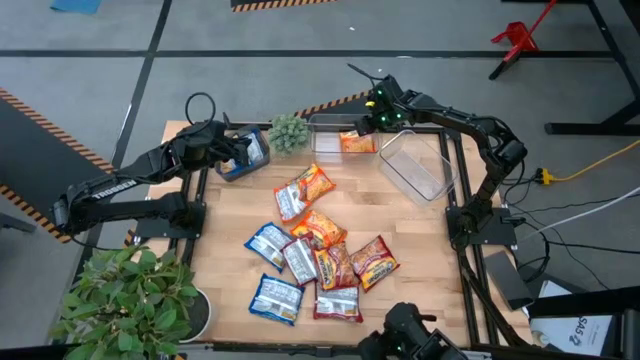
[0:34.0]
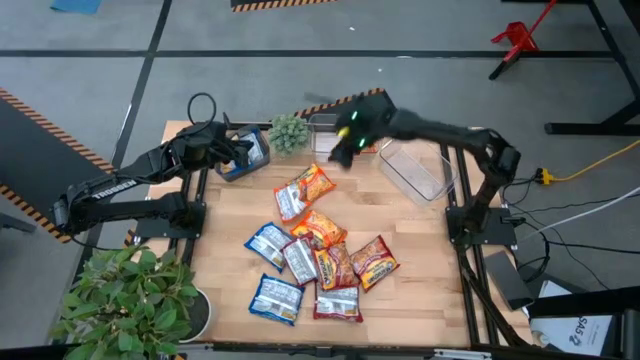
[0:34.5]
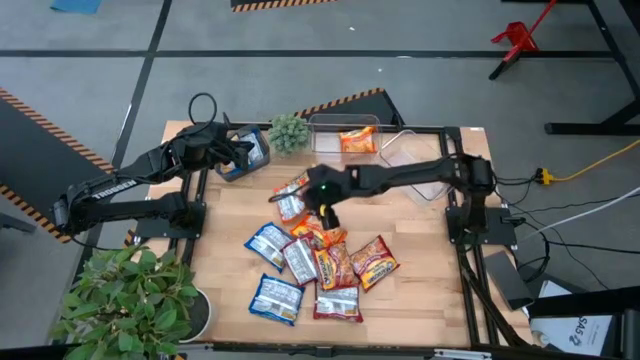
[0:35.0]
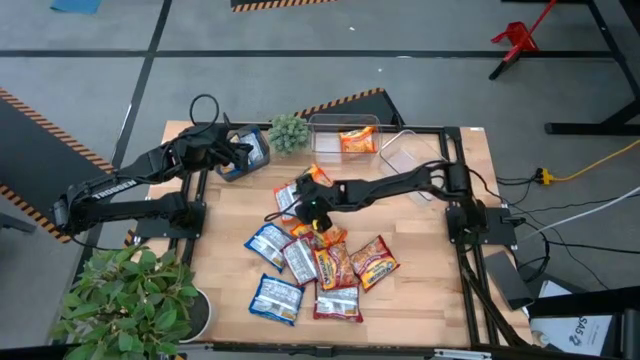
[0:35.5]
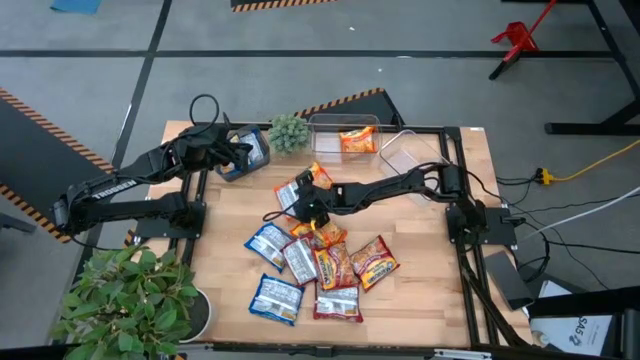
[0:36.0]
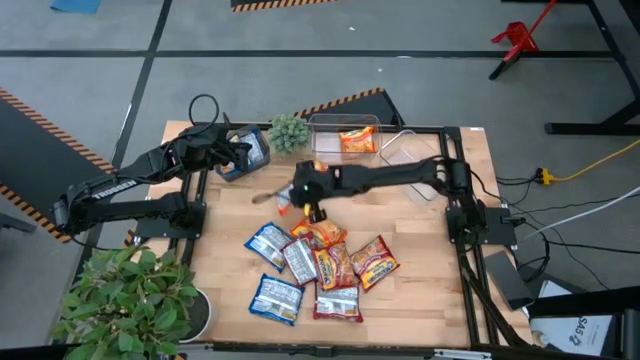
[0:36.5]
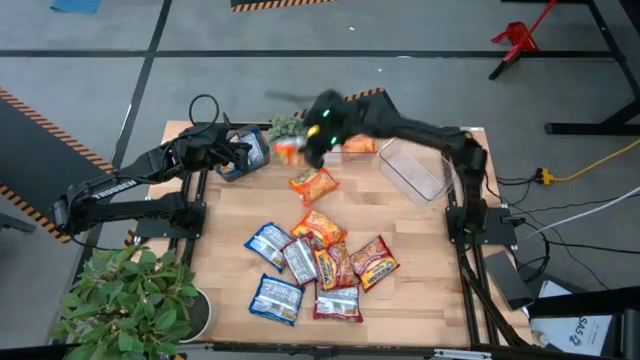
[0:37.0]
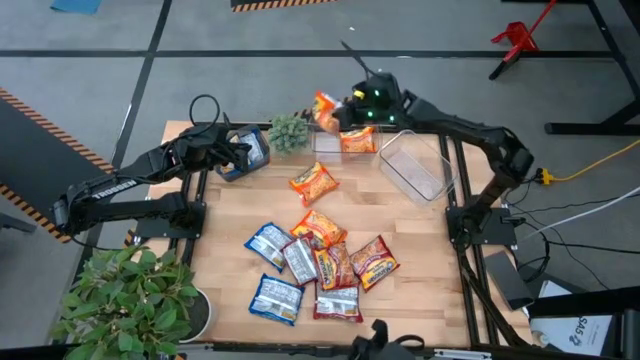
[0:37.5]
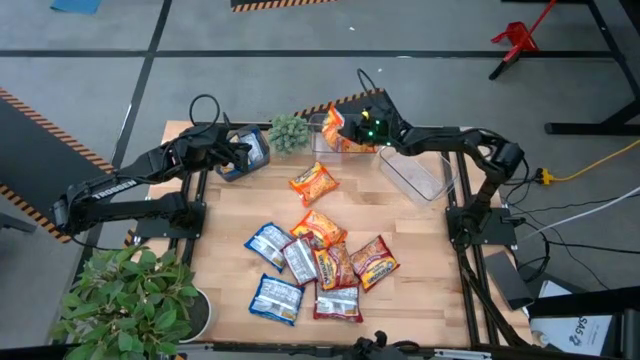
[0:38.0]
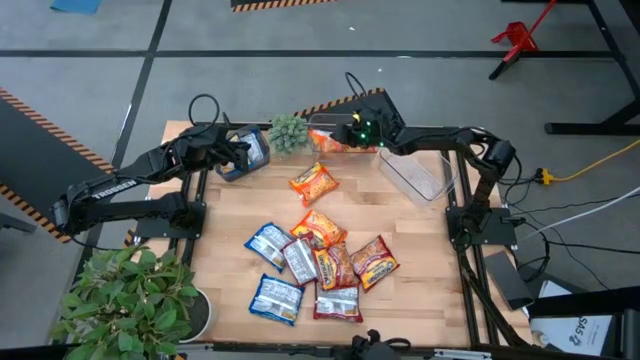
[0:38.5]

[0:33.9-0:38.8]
Task: Sort Maruchan noodles
Put the orange noodle pack into the left transparent bin

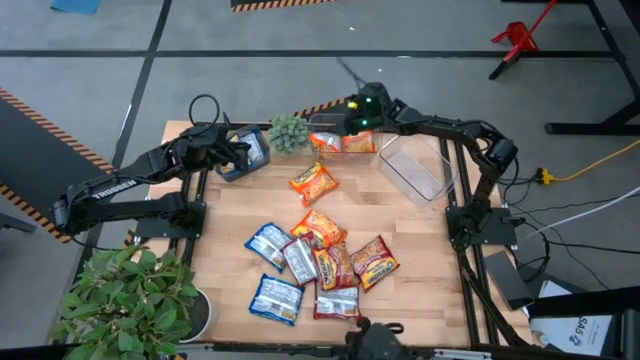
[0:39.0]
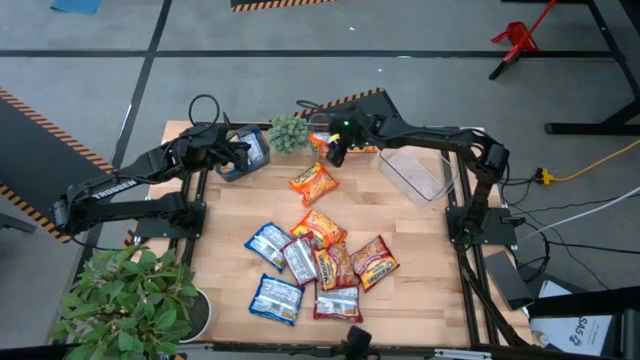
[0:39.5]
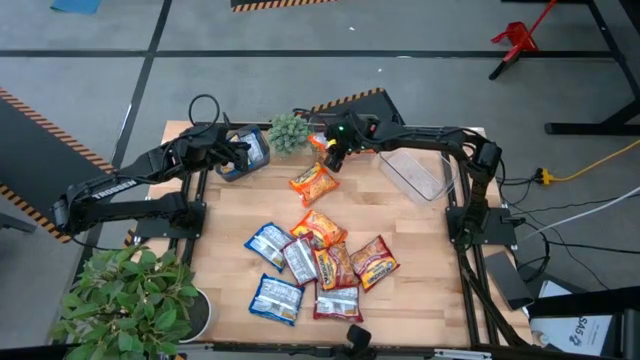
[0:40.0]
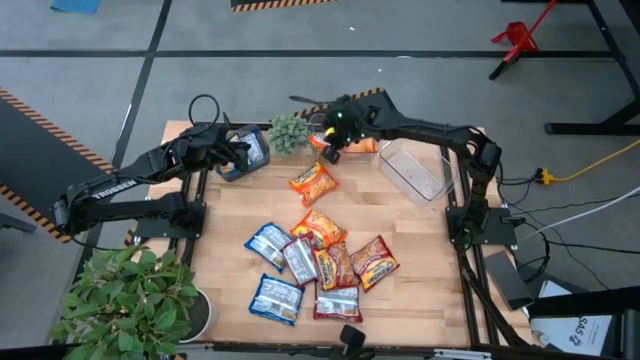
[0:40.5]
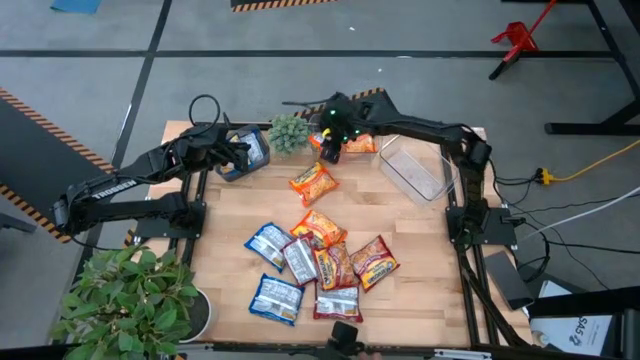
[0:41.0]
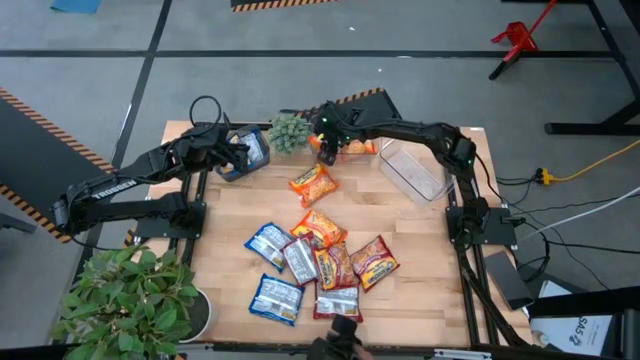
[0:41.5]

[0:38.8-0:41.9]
Put the orange noodle pack into the left transparent bin

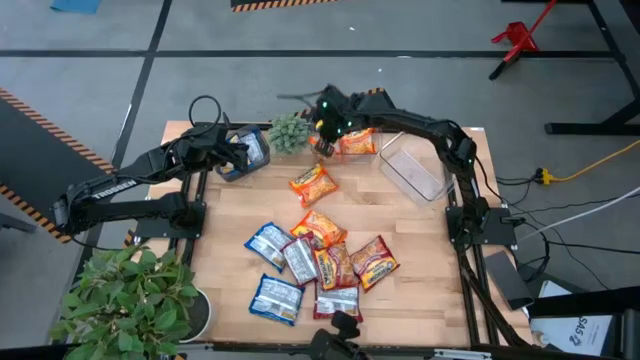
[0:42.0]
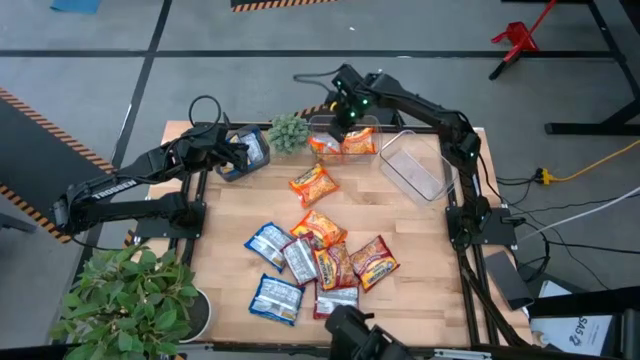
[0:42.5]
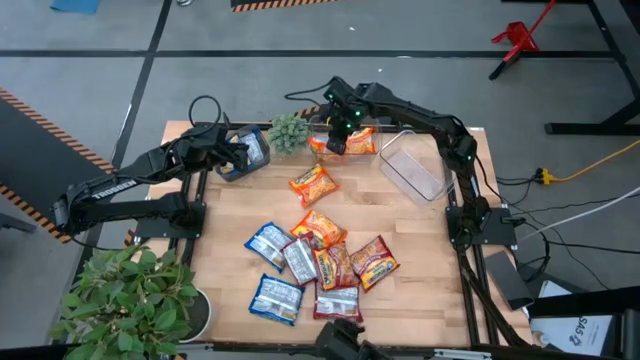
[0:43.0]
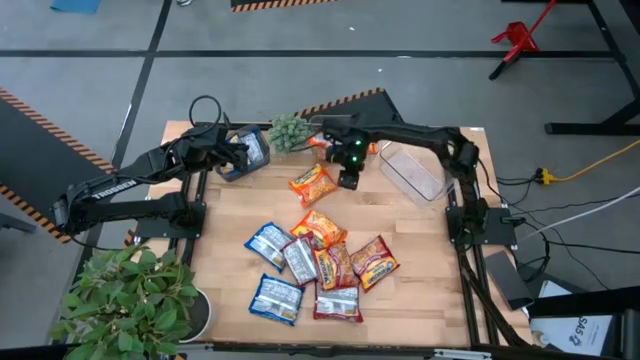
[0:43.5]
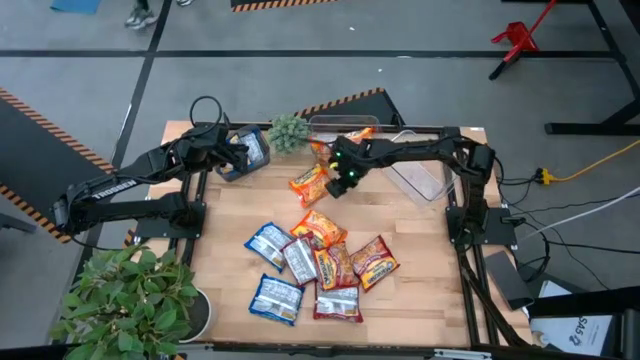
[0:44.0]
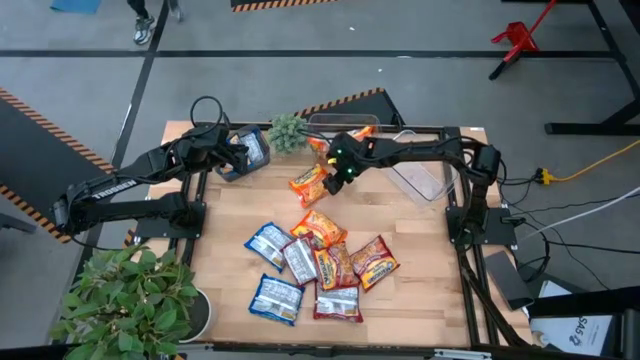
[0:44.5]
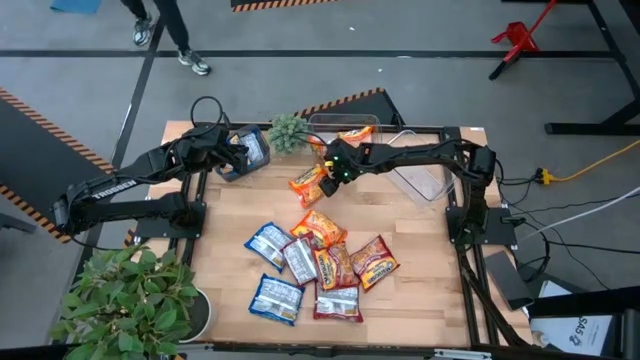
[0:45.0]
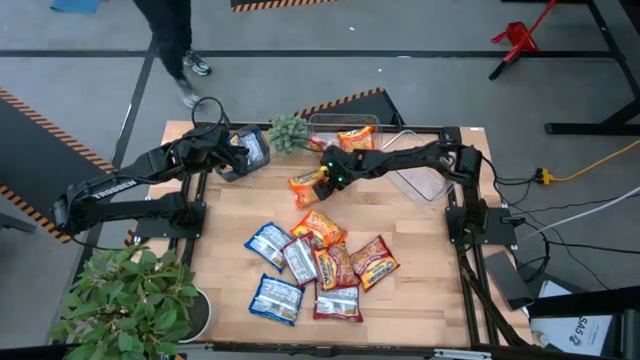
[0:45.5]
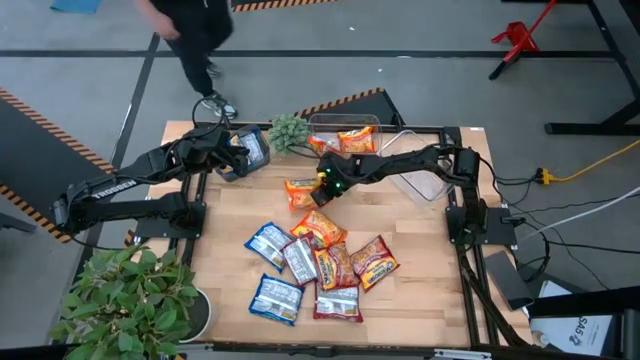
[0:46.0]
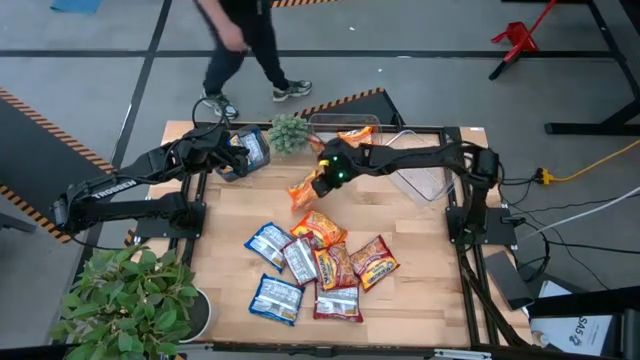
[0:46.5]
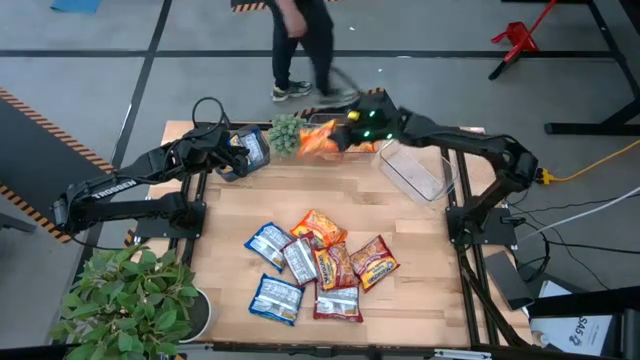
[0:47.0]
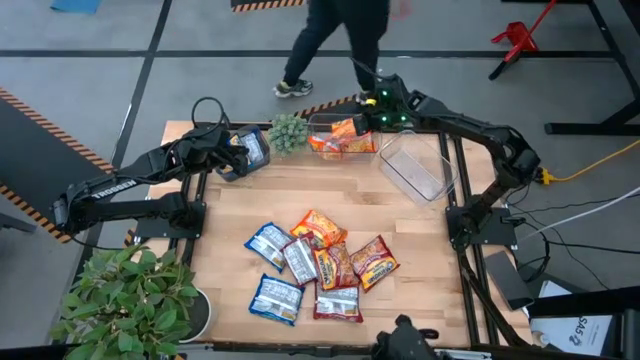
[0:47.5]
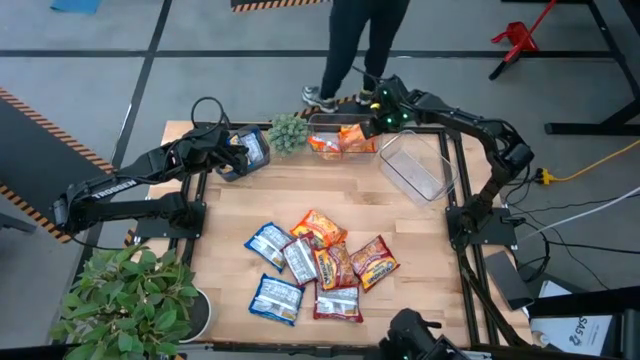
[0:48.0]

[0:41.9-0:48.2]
Put the orange noodle pack into the left transparent bin

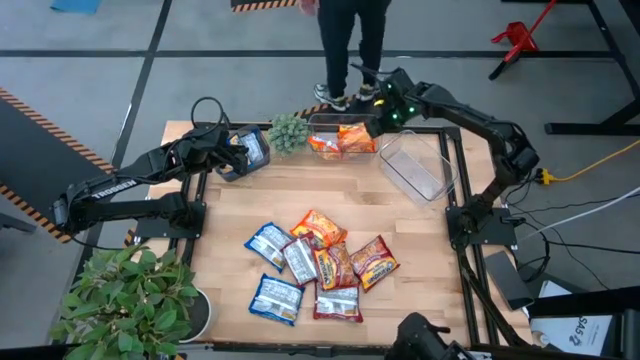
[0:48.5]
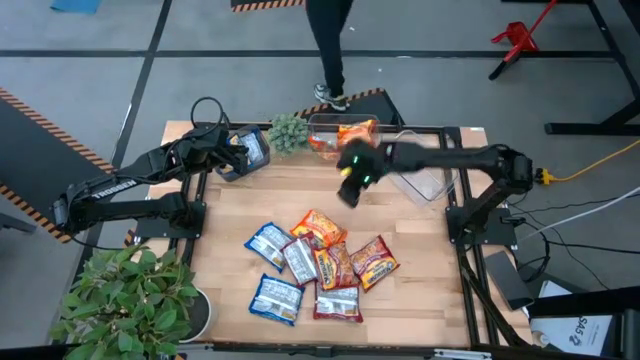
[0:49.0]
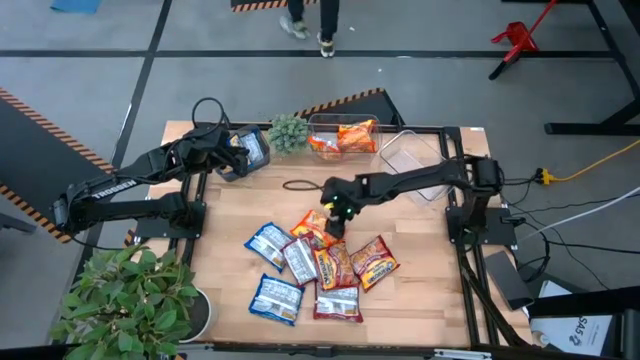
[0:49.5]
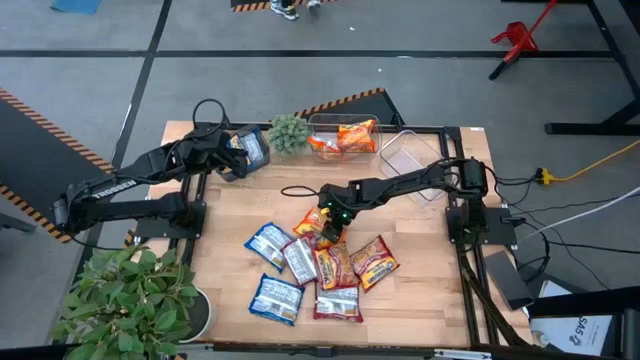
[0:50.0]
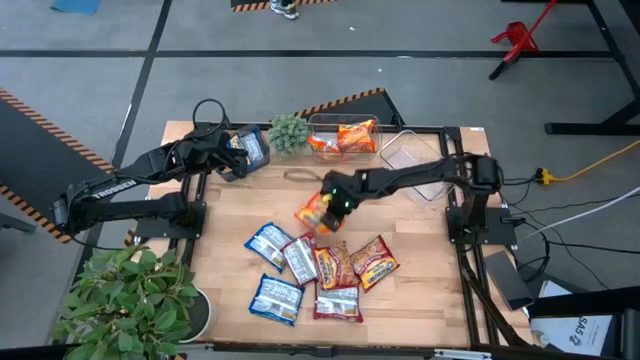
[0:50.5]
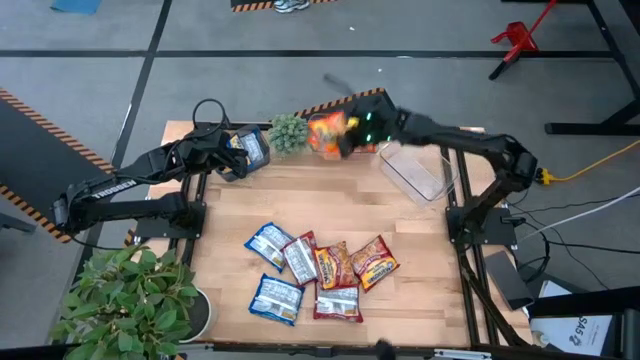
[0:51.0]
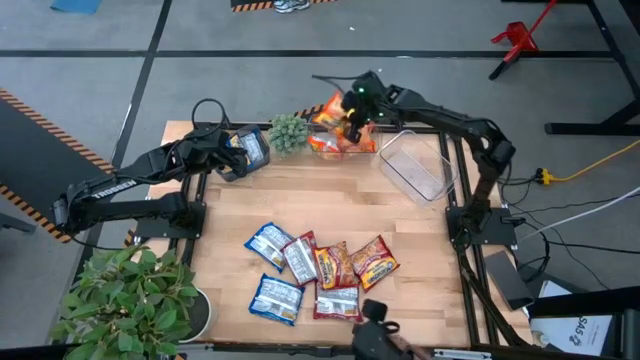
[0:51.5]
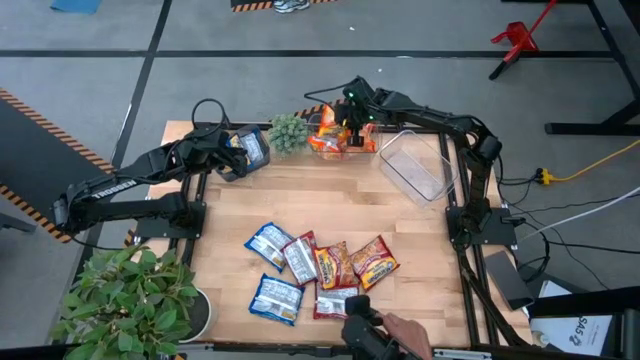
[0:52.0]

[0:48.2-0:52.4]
Put the orange noodle pack into the left transparent bin

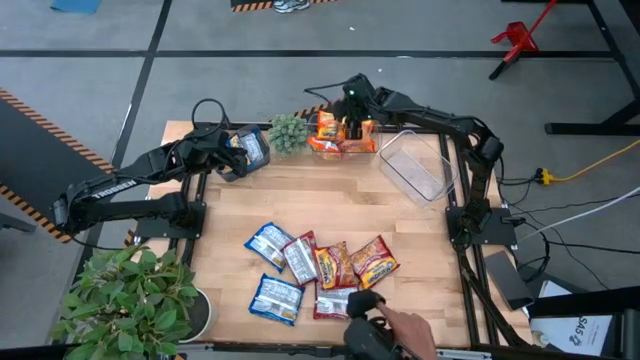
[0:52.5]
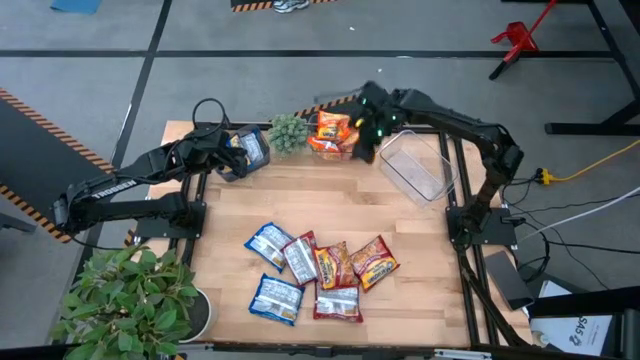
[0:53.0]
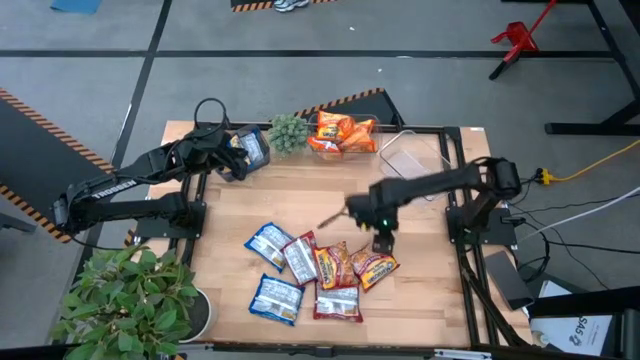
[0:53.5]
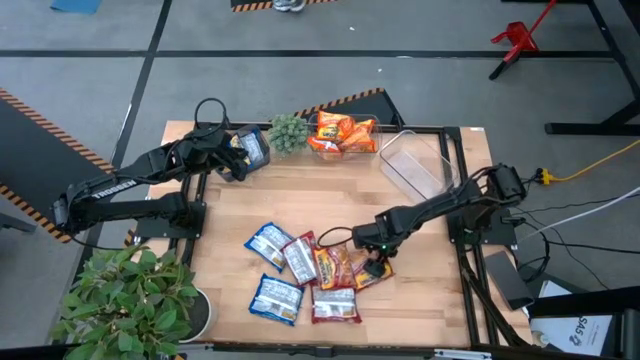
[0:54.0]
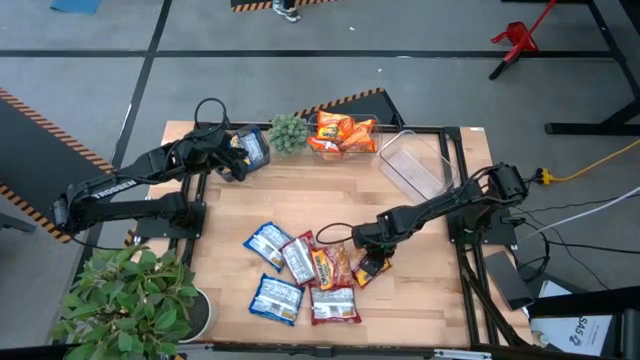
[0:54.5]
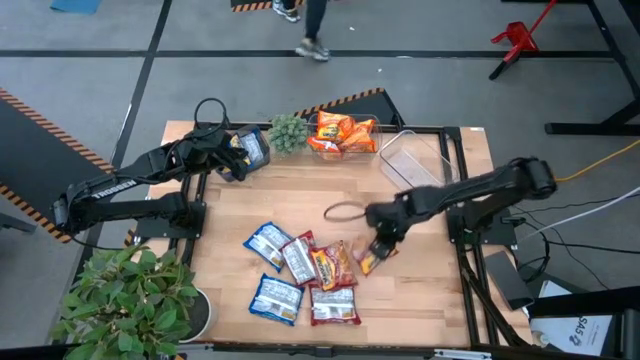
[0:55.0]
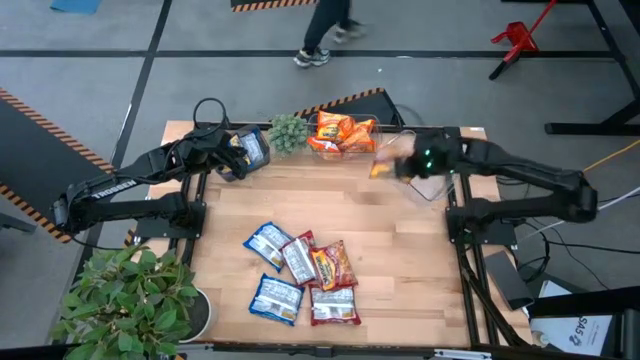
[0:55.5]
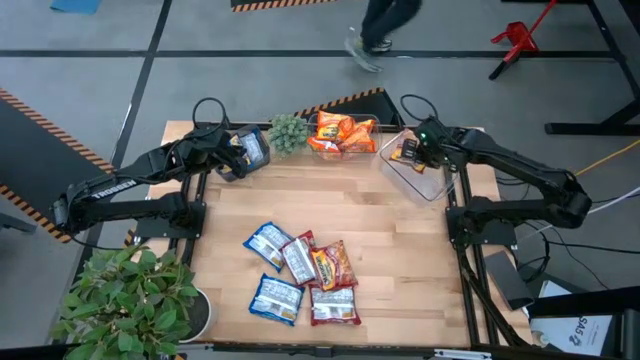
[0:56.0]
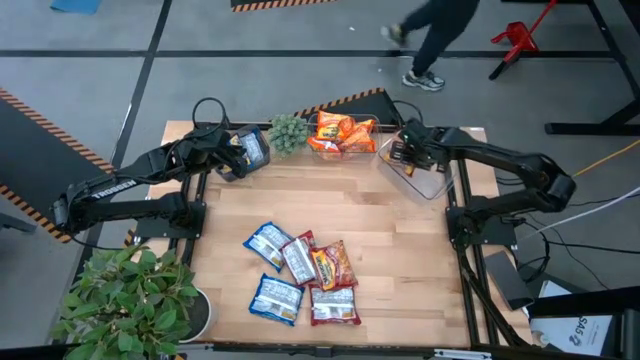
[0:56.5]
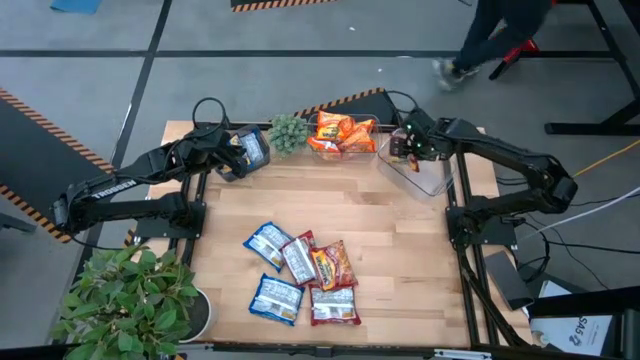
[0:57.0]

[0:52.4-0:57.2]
Put the red noodle pack into the right transparent bin
